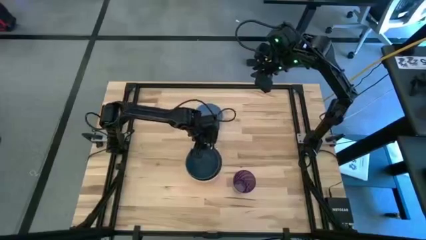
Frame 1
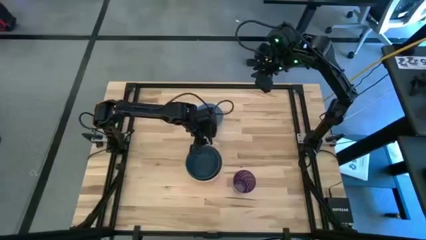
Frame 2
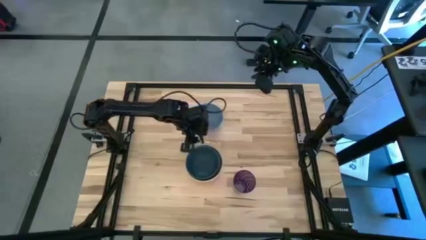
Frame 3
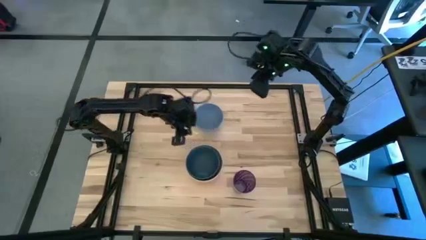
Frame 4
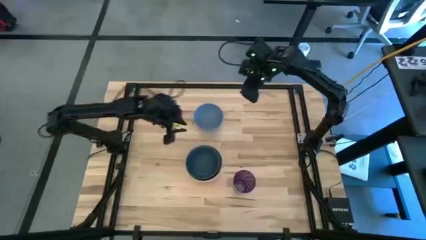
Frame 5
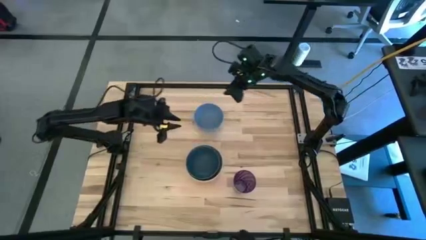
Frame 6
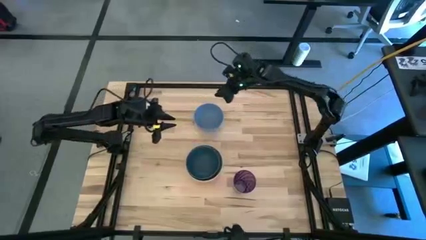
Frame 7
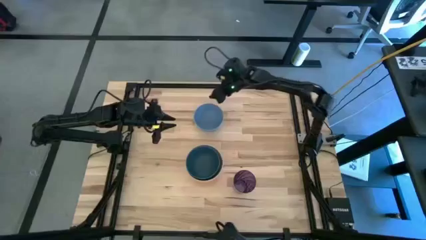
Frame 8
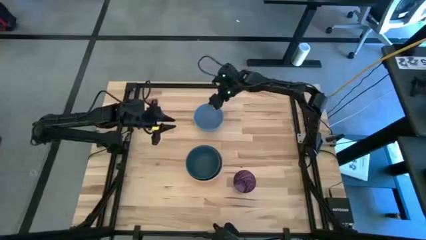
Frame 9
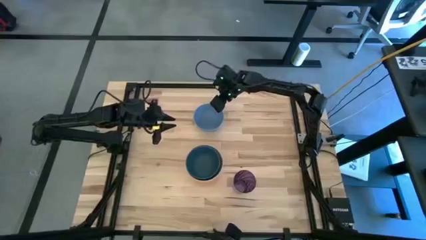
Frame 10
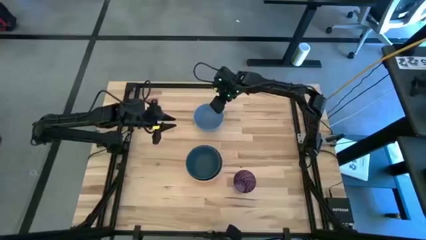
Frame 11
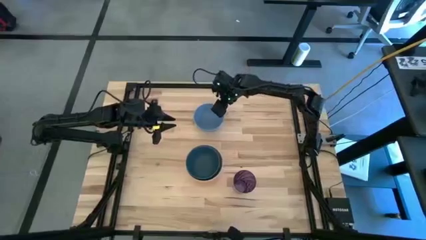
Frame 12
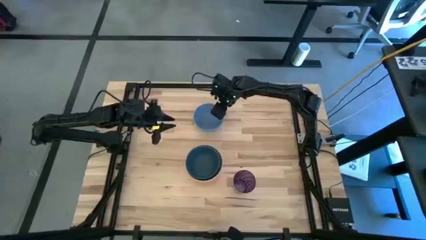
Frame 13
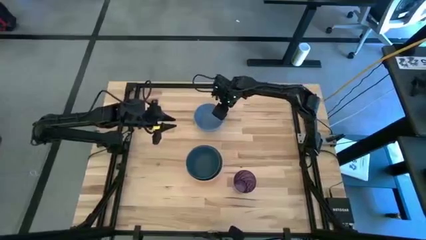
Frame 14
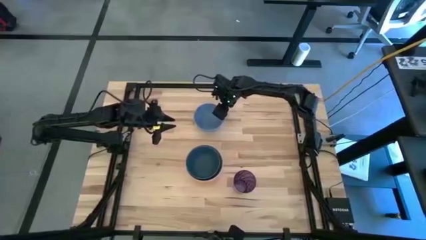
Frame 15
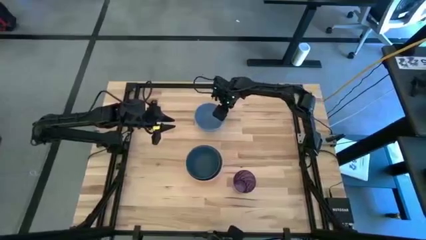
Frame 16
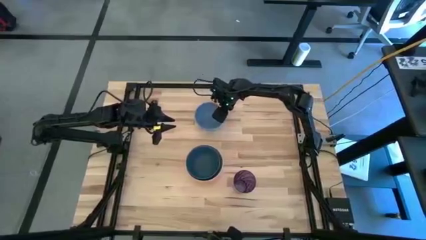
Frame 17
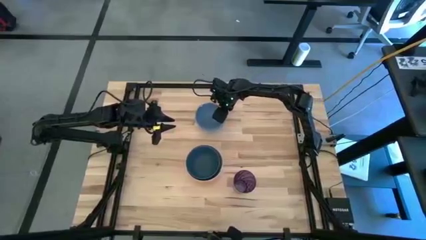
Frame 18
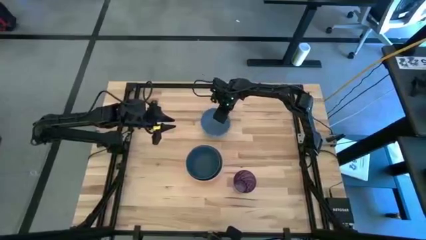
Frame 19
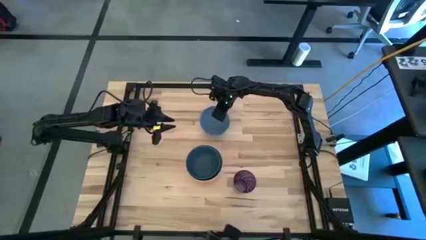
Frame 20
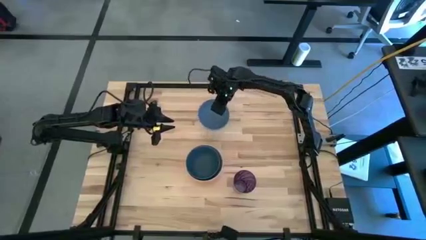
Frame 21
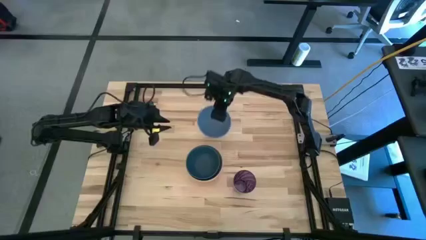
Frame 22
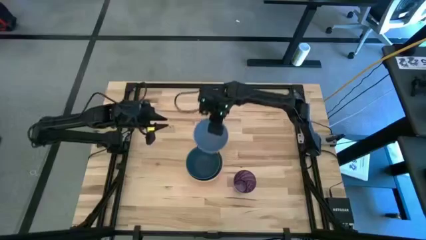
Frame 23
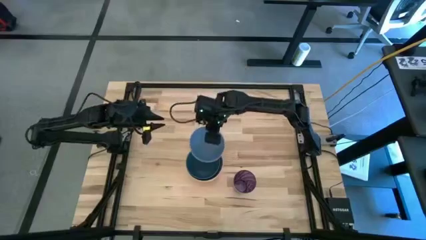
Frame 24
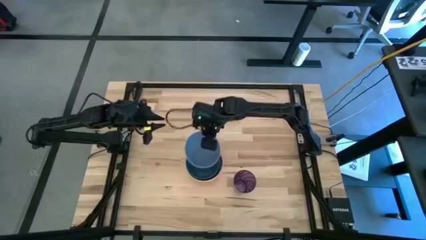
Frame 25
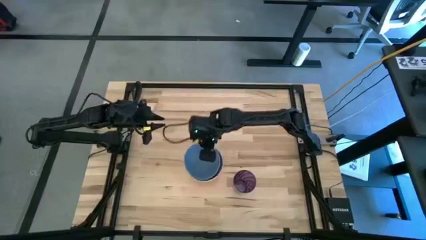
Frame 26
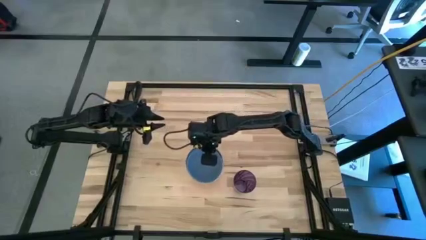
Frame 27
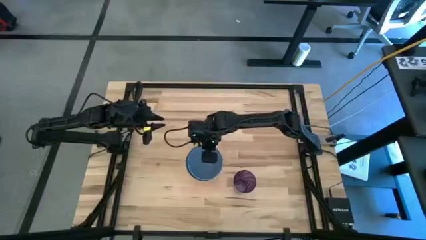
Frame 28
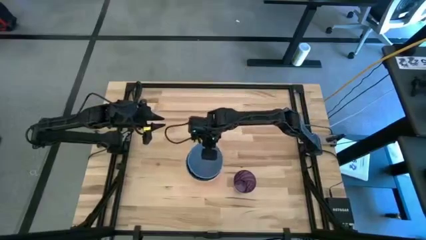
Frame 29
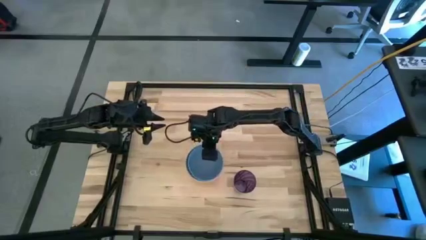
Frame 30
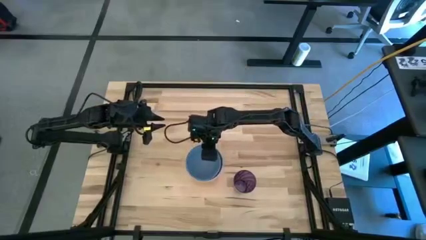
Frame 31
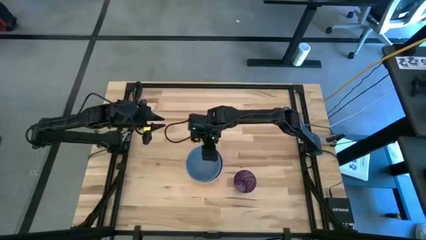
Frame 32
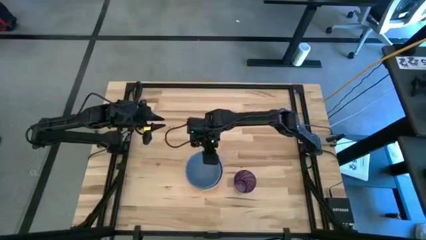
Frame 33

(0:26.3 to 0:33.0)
Stack the light blue bowl on top of the blue bowl

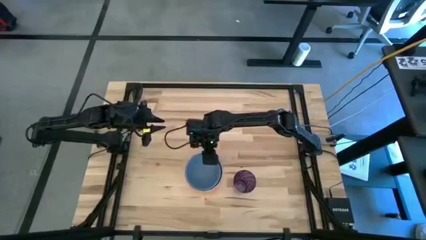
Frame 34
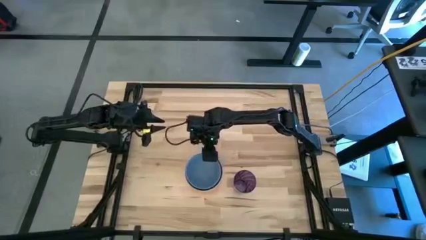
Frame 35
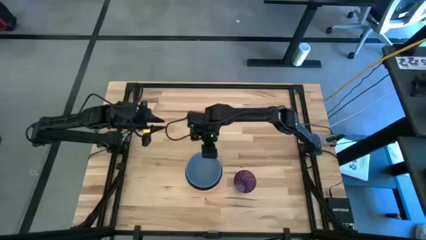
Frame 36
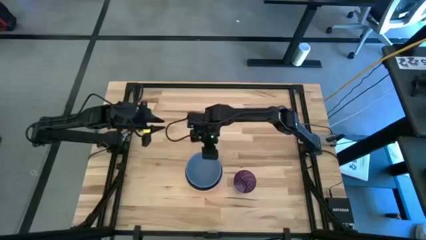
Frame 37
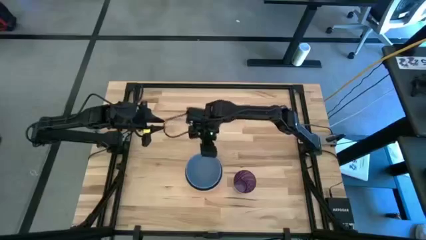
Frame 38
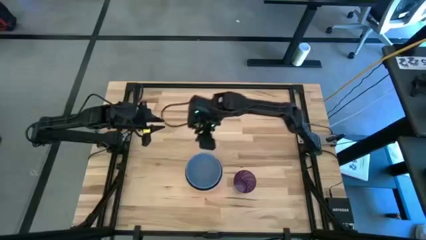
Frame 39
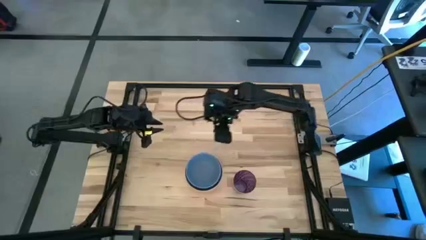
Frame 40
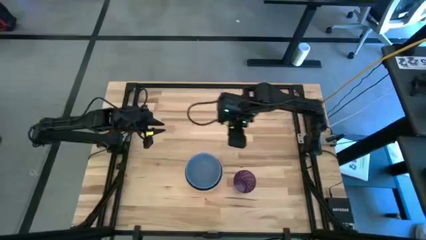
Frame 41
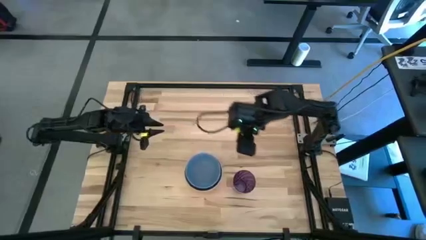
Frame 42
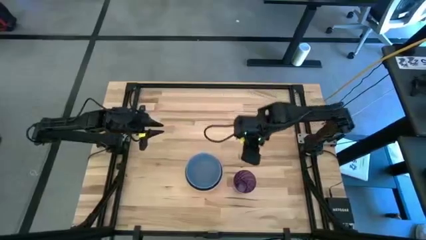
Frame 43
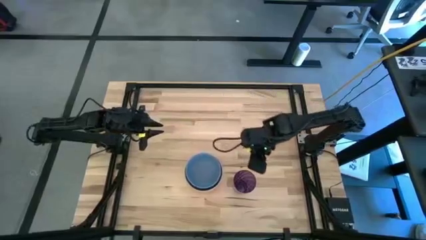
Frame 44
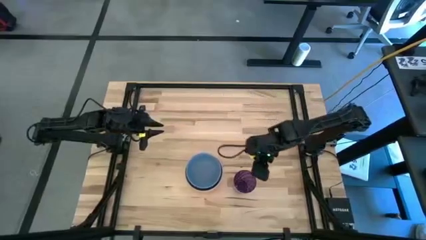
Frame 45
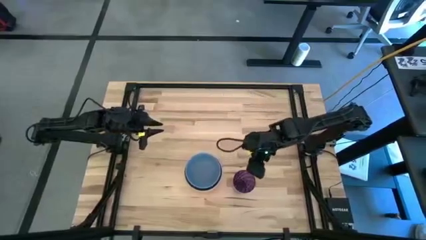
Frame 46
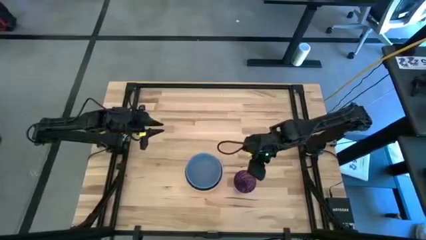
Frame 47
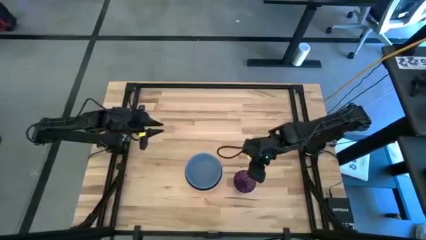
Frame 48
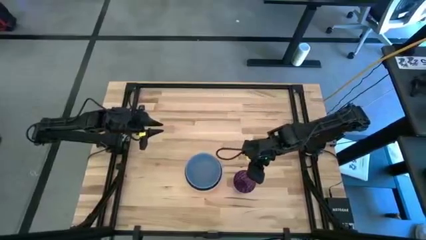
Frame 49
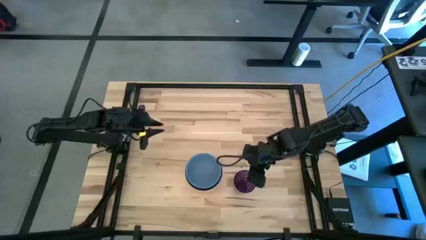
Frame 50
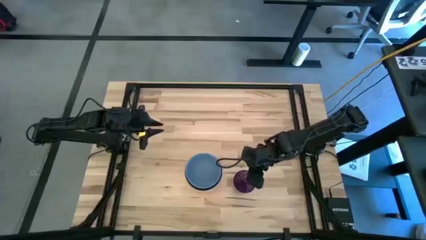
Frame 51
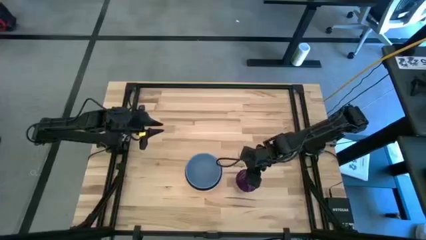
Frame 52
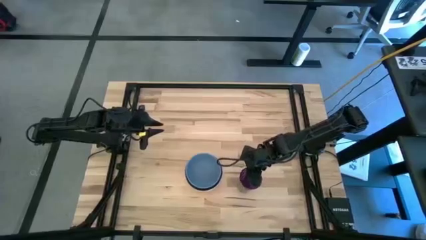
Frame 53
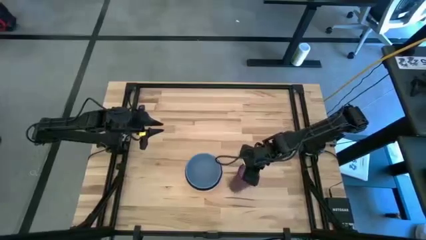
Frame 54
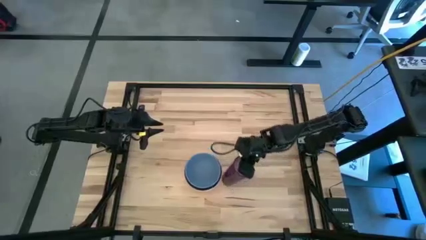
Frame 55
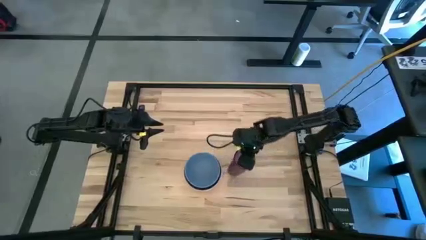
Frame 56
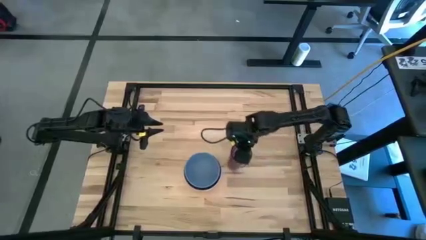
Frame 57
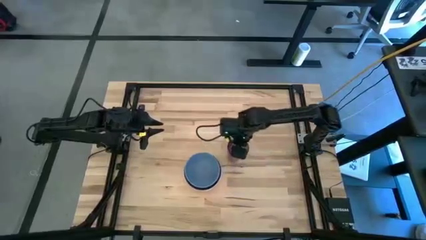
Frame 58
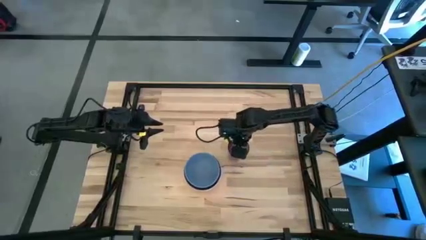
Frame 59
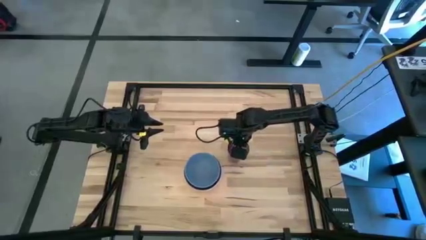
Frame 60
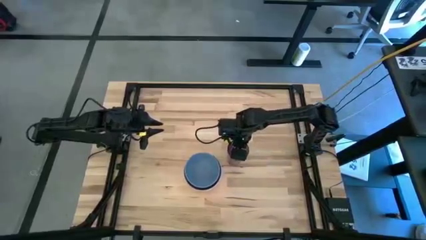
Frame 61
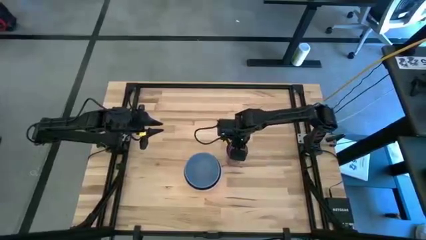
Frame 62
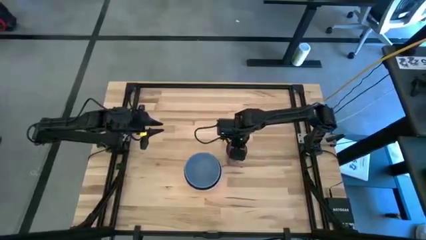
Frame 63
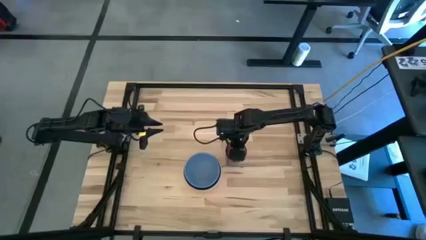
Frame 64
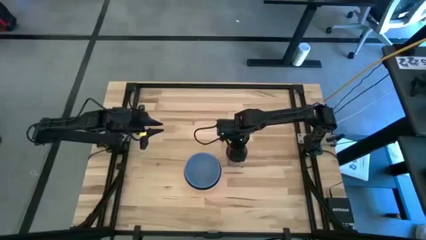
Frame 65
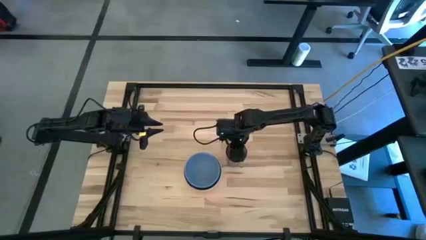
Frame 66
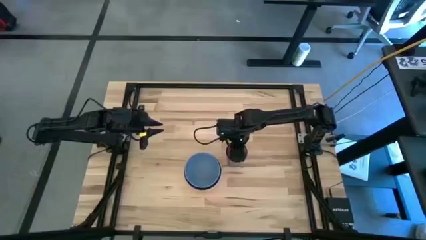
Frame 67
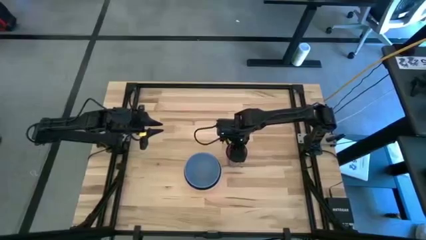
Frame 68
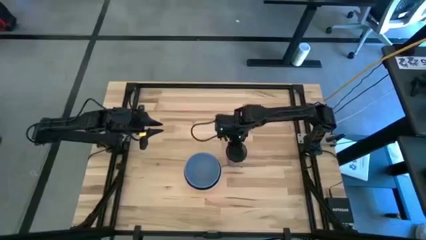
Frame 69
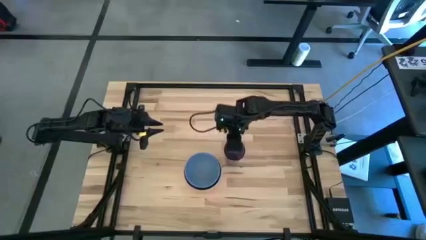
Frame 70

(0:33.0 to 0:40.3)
Put the violet cup to the top right of the stacked bowl

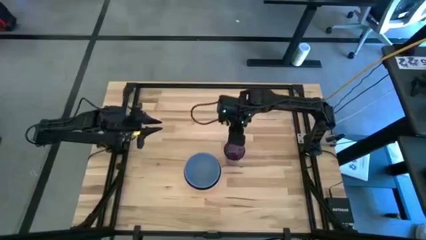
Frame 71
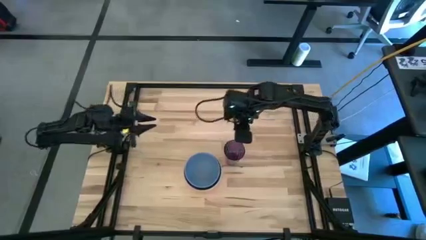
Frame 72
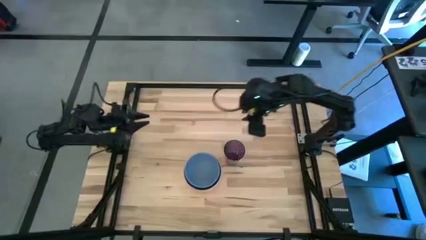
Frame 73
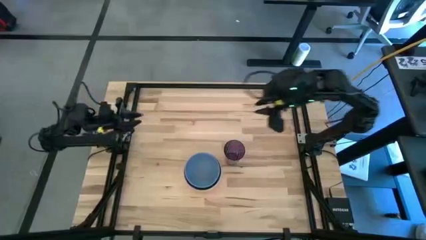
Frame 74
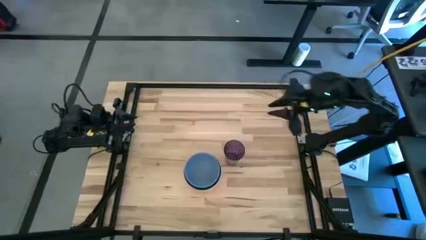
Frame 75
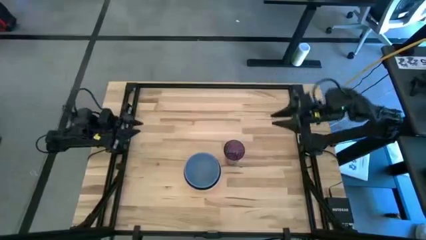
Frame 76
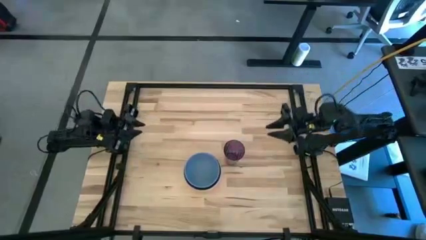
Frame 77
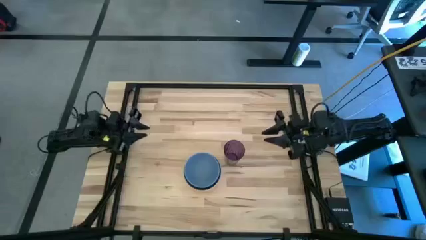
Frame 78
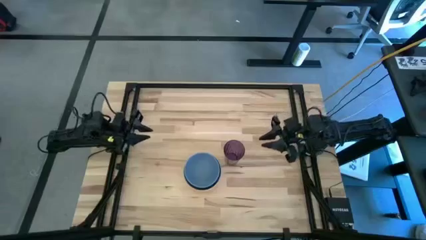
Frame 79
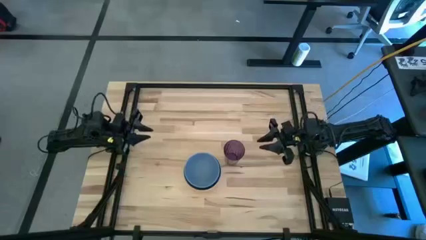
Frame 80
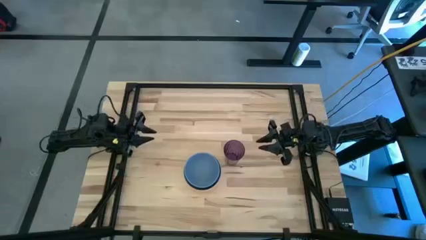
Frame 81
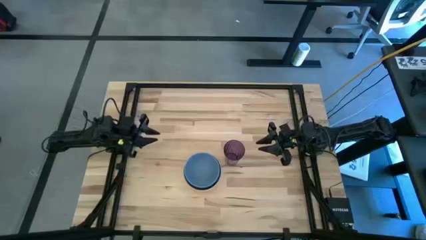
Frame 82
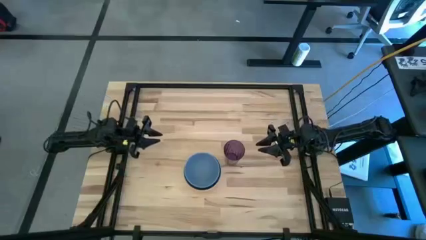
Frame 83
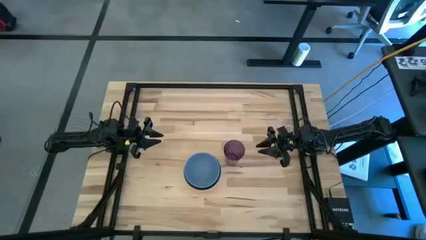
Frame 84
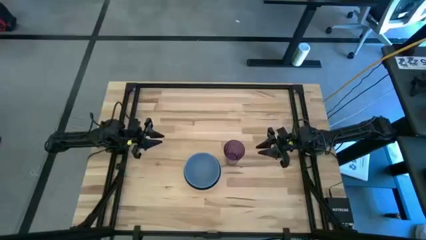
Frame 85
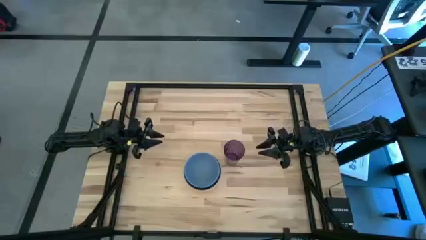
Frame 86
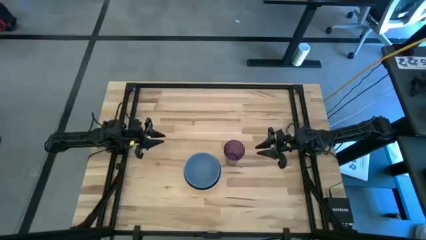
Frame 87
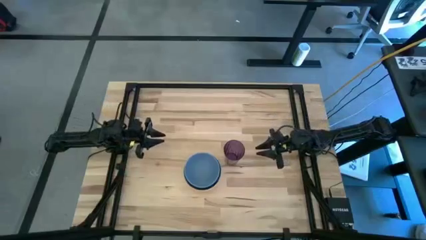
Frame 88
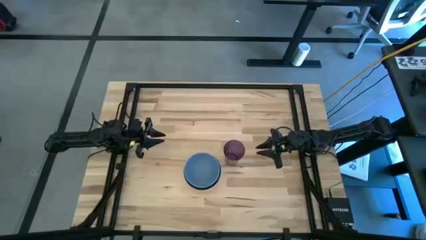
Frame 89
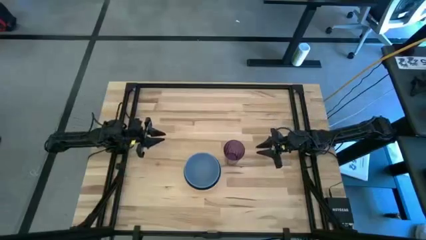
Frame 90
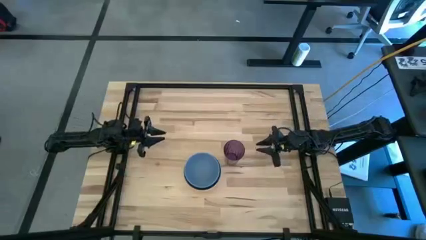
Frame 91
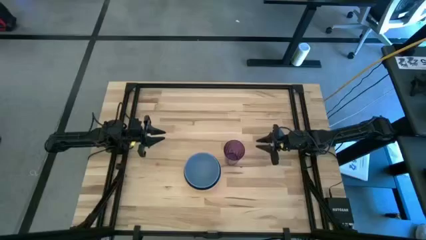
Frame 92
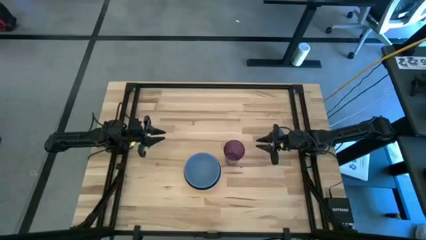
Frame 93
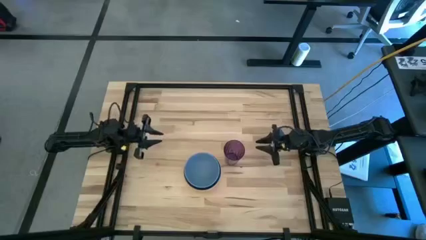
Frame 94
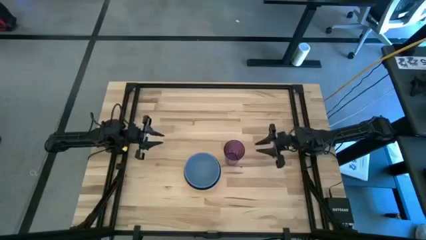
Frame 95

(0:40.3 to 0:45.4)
Return to Home Position
